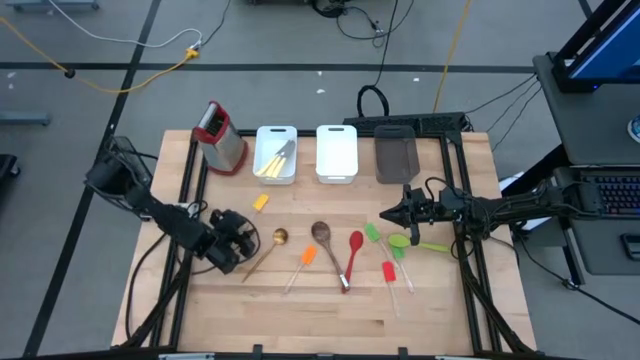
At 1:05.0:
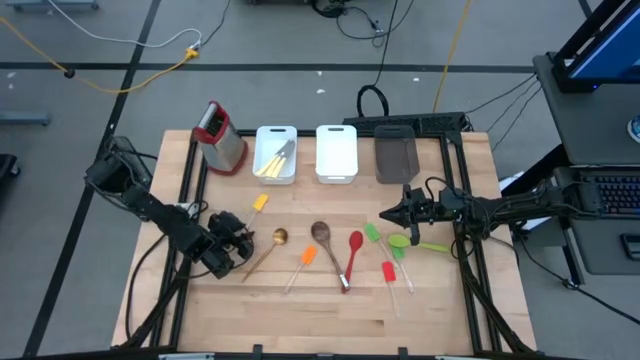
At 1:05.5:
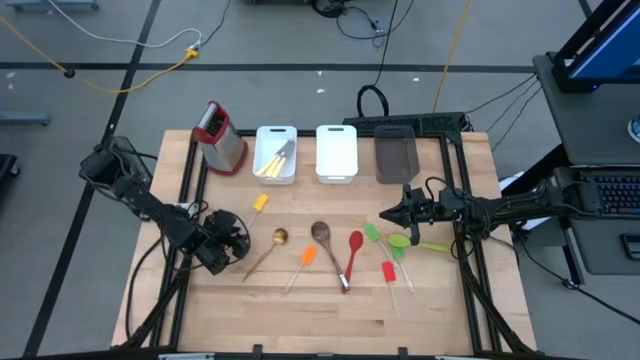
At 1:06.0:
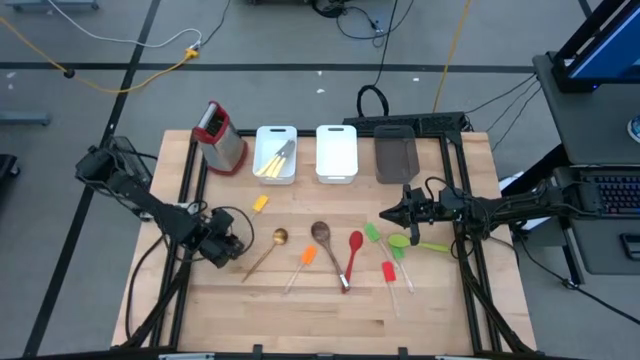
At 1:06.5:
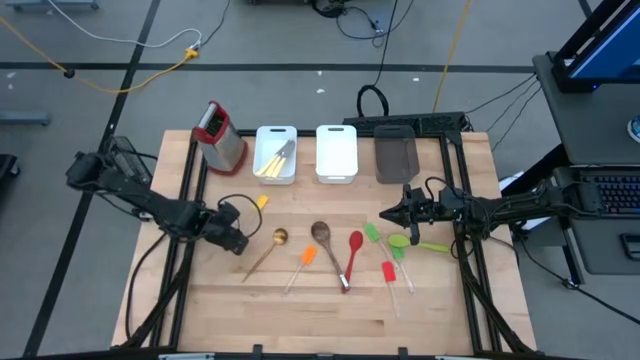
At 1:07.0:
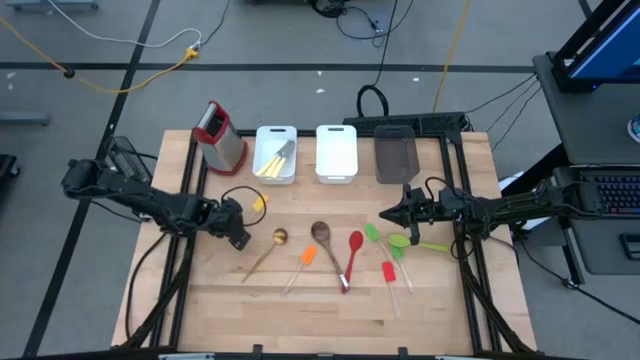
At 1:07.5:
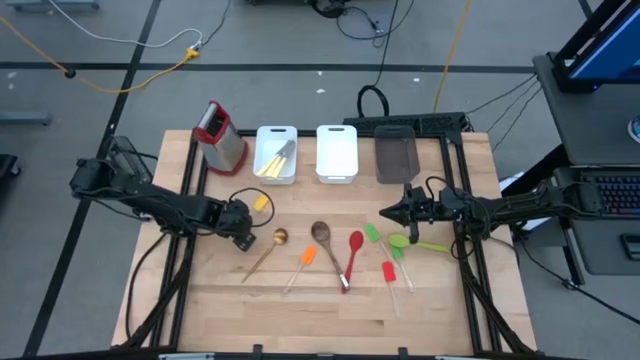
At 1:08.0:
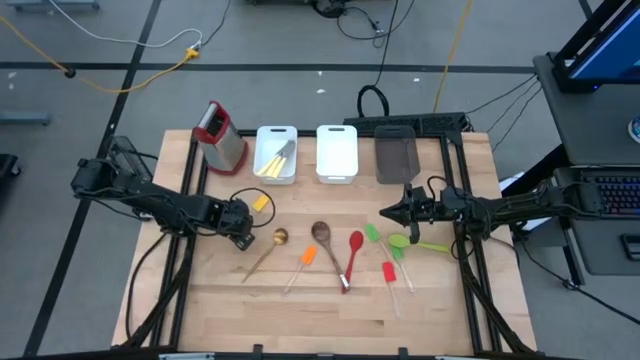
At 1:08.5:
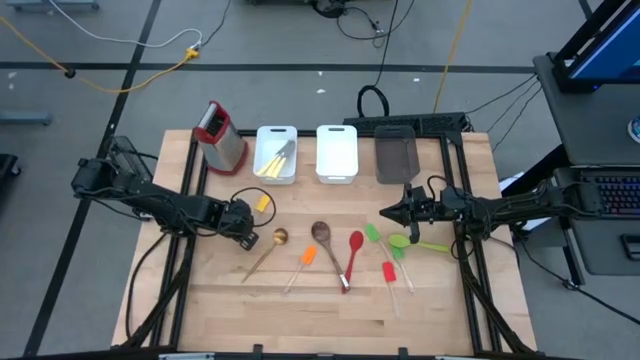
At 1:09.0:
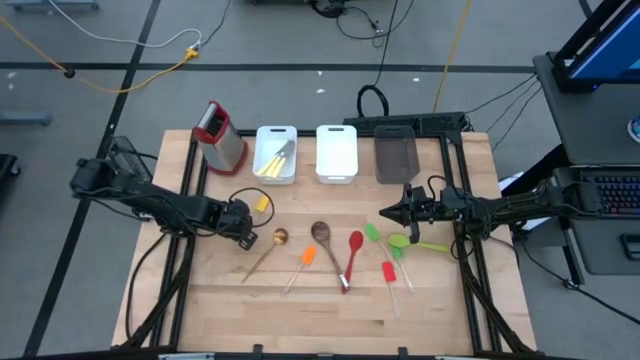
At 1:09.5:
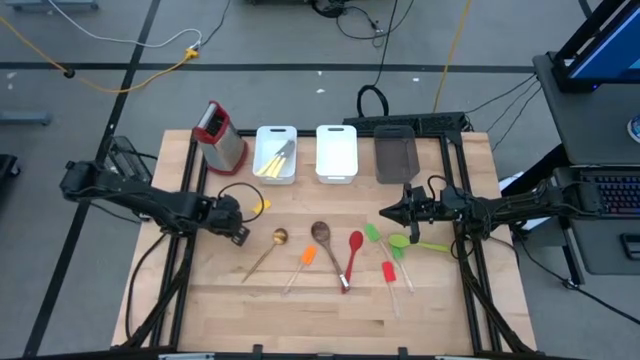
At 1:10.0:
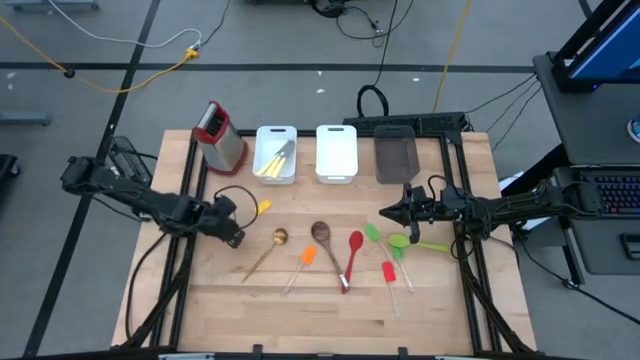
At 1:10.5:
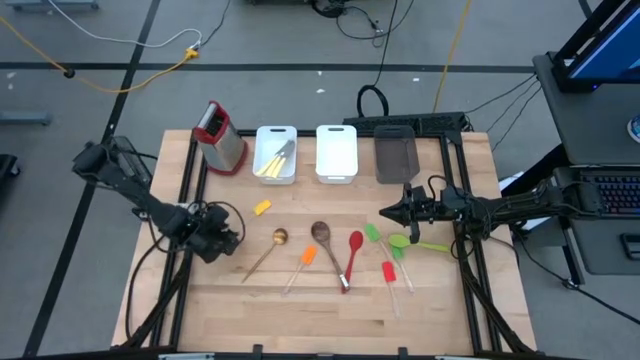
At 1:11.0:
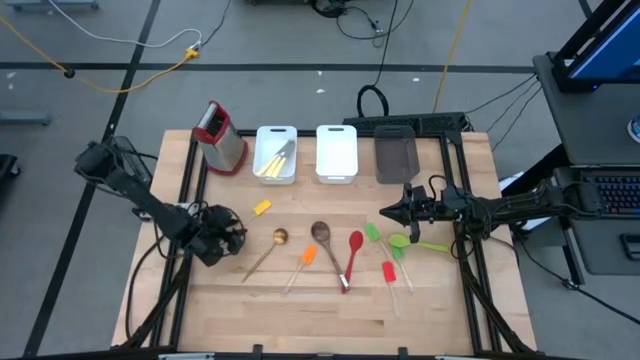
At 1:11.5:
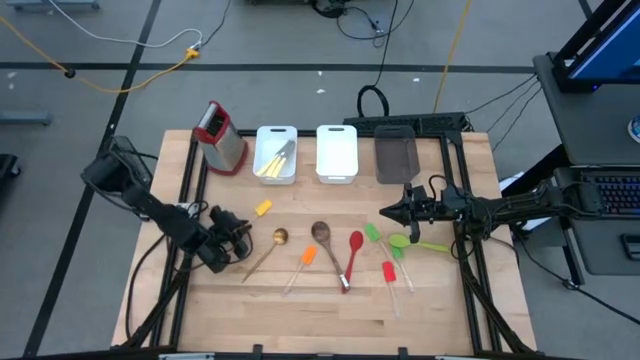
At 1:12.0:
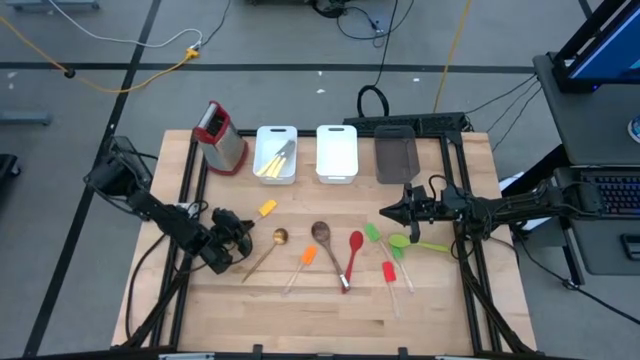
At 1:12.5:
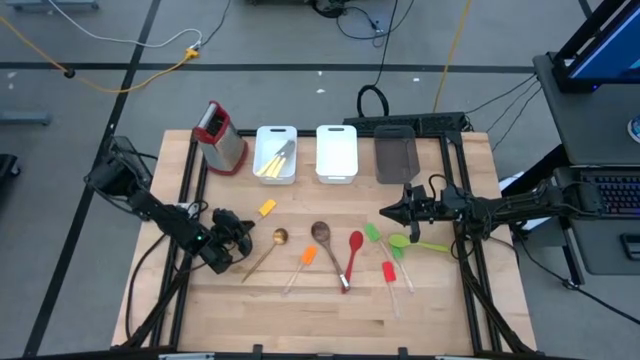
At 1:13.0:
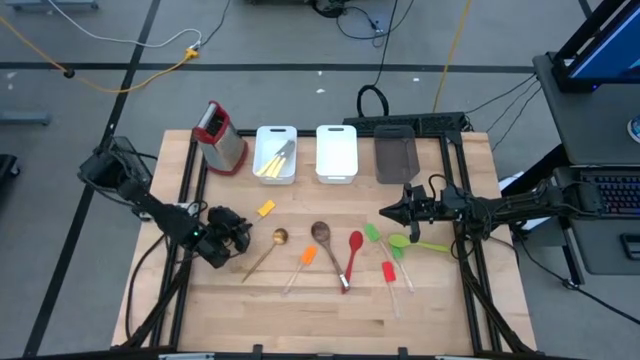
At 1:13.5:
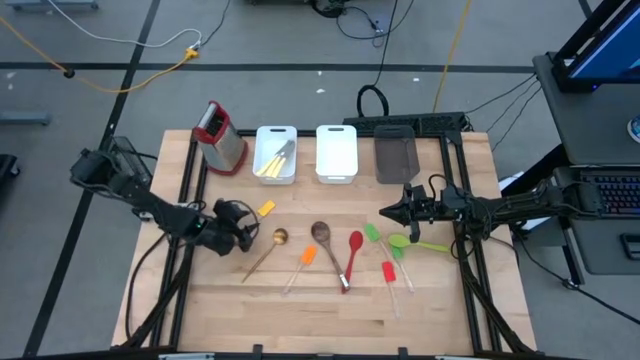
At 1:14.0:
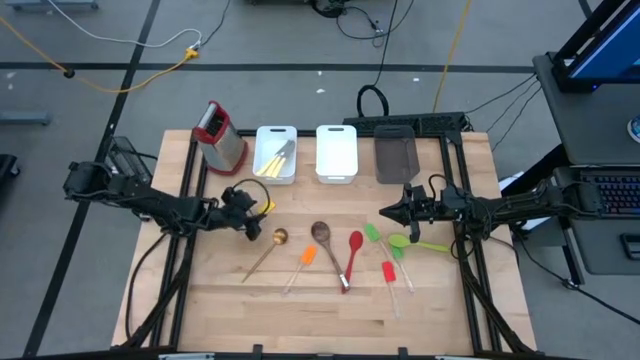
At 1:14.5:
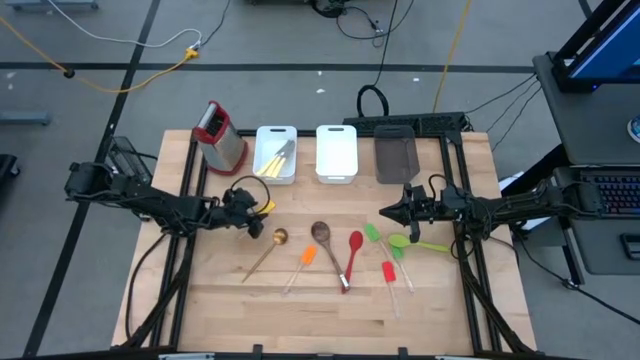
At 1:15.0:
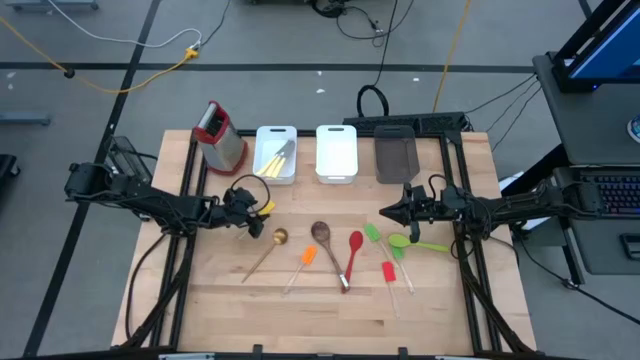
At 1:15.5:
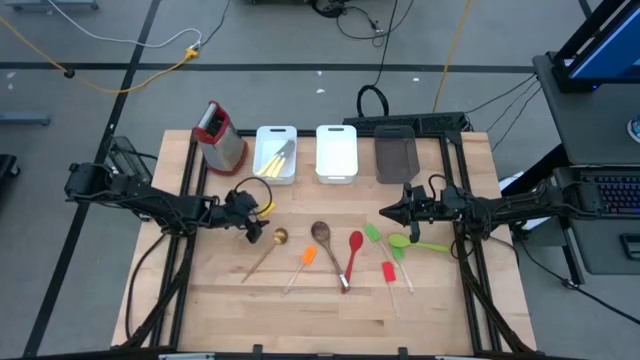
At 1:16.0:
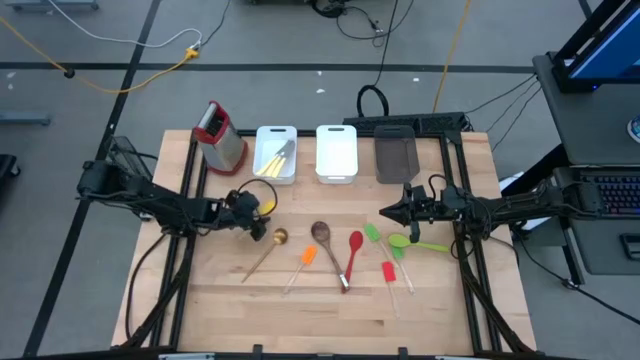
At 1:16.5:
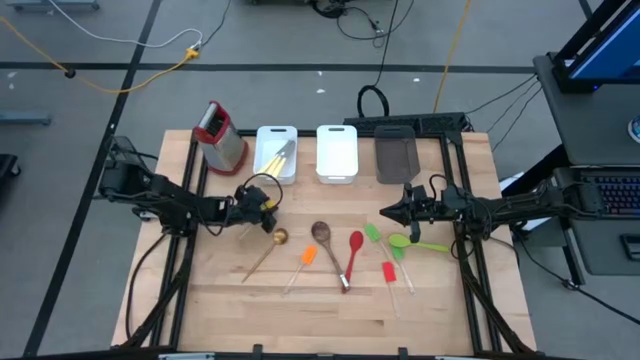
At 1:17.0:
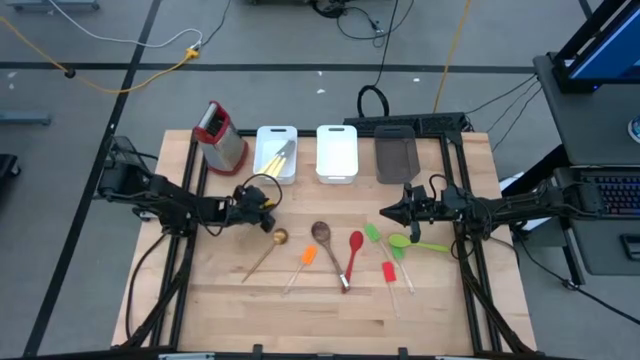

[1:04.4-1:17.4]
Task: Pick & Place Kitchen Items
Put the yellow spatula into the black bin

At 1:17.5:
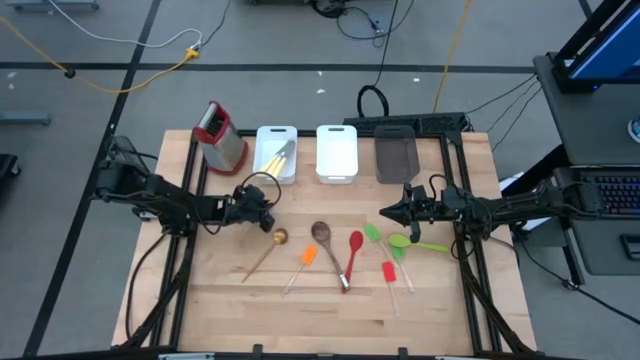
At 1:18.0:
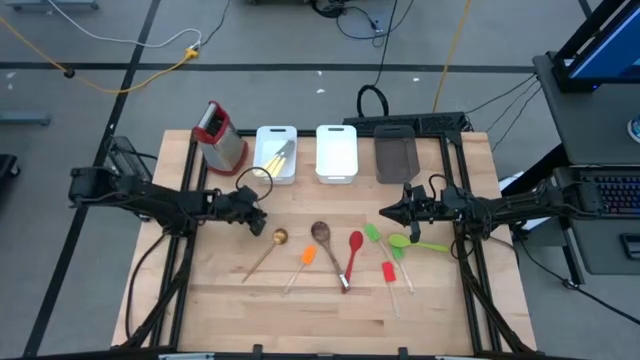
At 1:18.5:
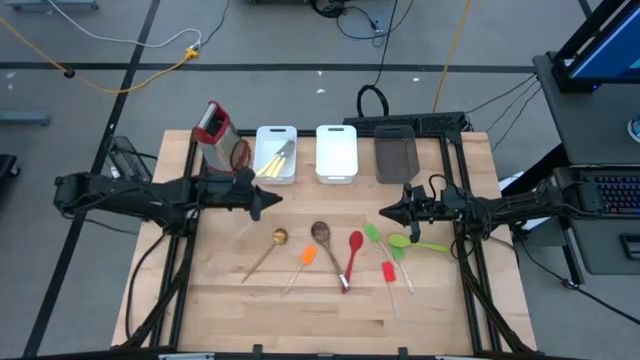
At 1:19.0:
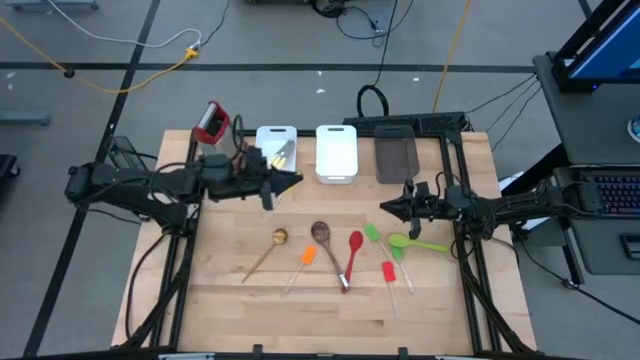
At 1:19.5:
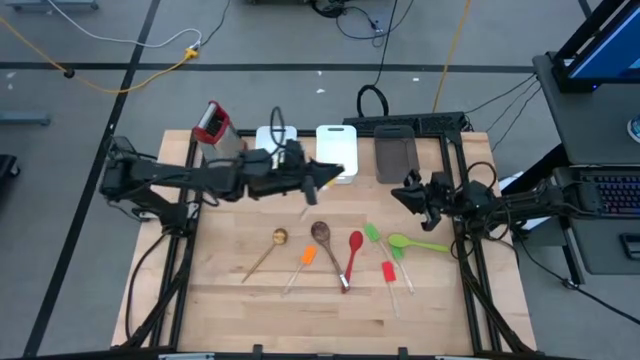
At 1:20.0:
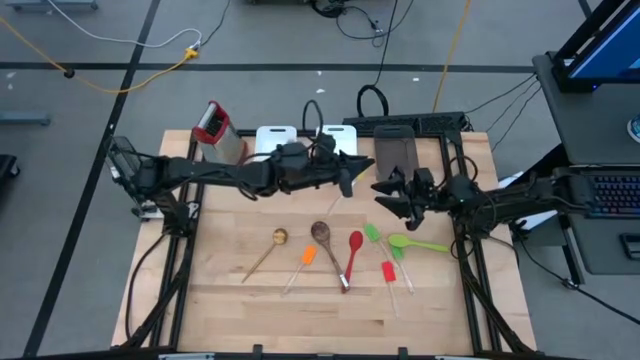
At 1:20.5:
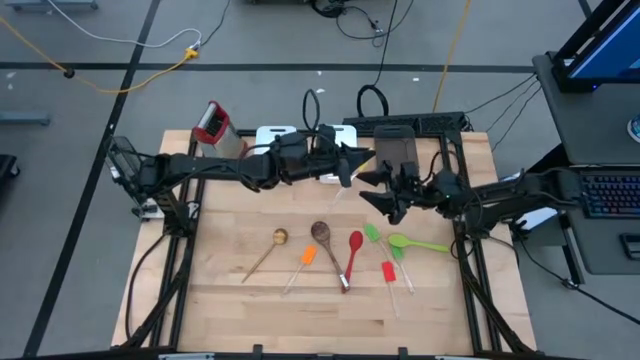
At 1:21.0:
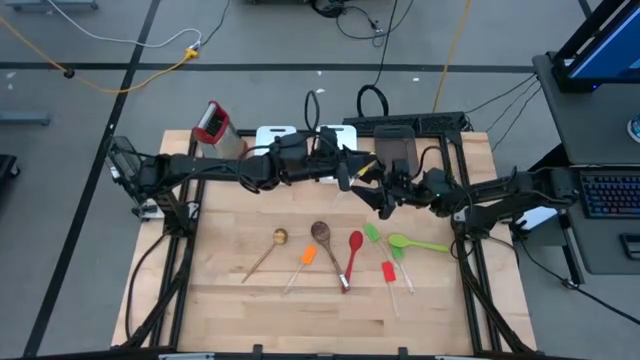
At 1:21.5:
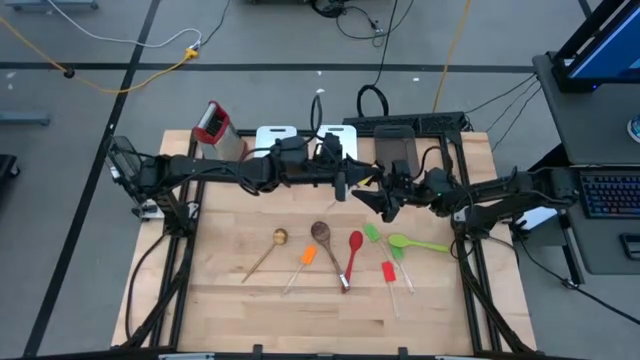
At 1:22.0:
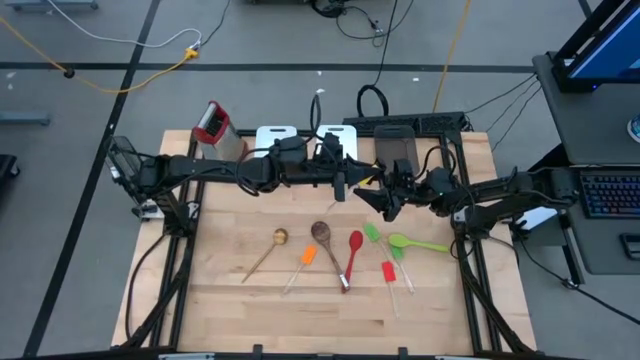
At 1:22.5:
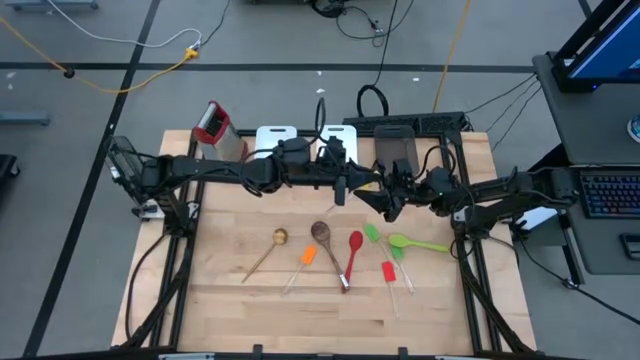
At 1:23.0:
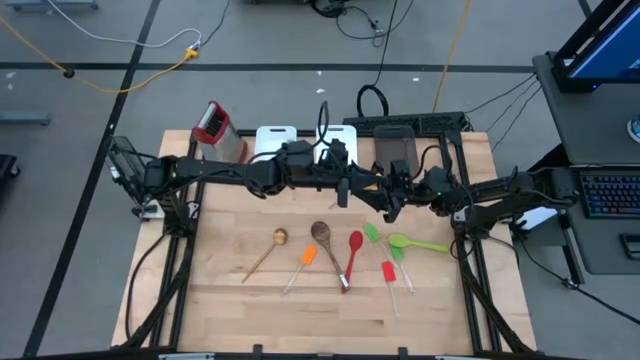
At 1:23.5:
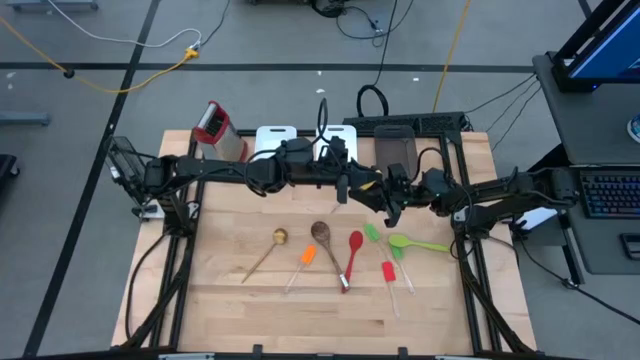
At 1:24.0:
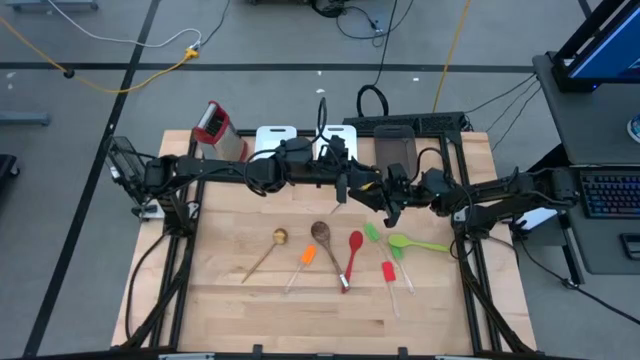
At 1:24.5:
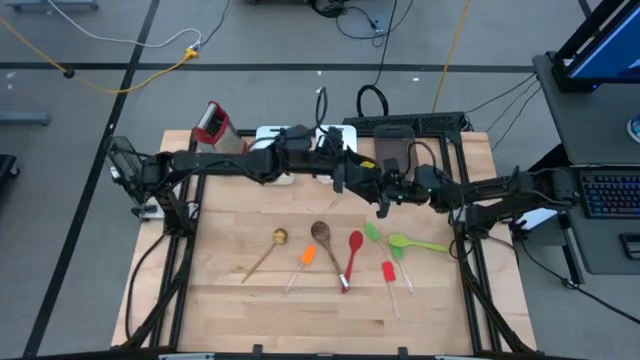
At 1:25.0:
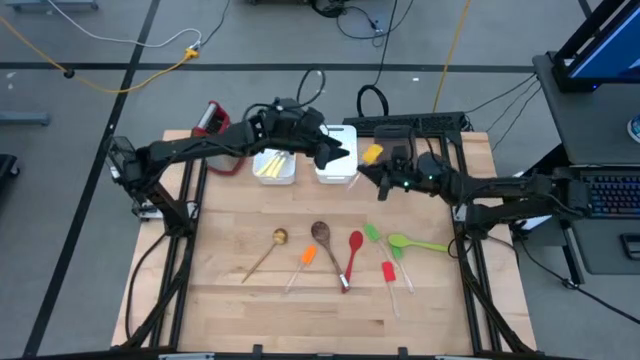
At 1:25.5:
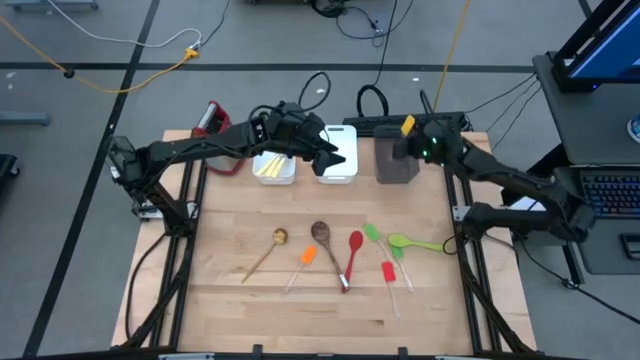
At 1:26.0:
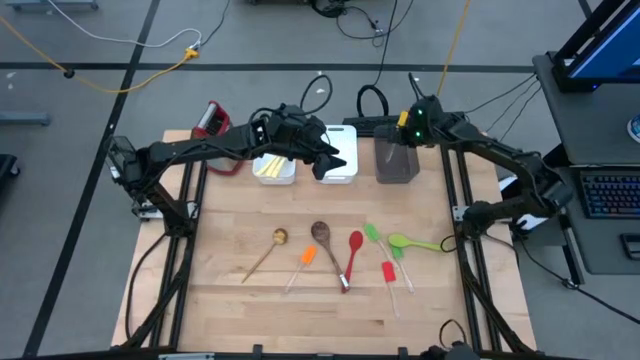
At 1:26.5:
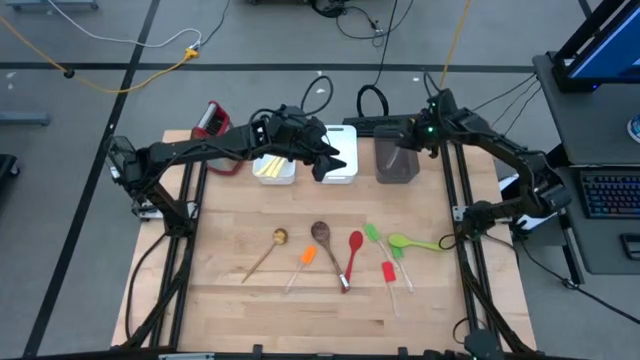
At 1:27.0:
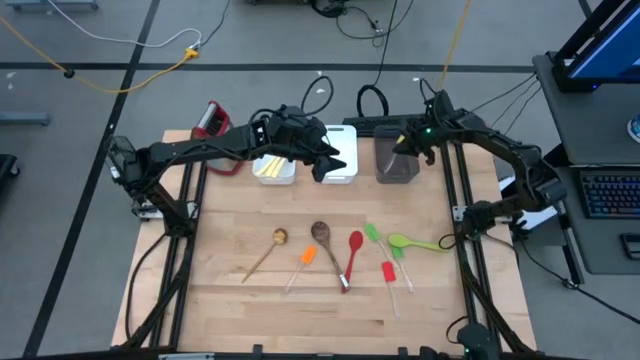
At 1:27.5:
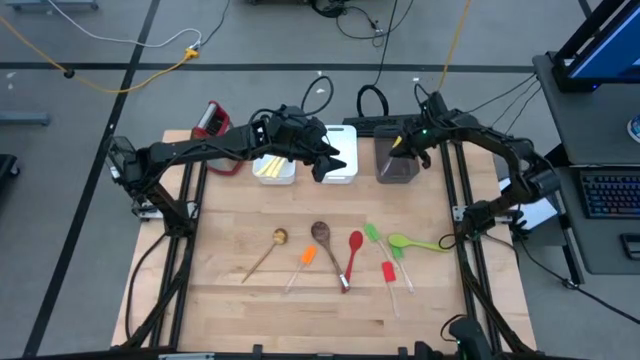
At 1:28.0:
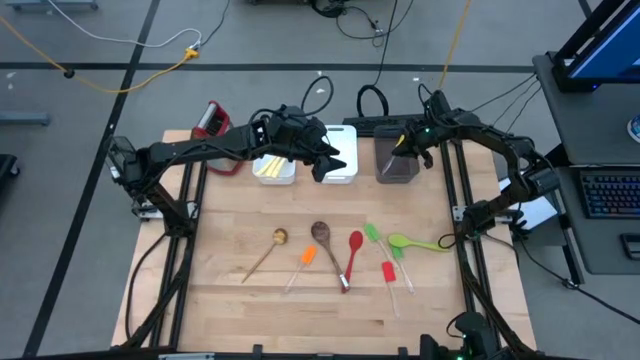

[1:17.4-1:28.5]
Put the yellow spatula into the black bin
